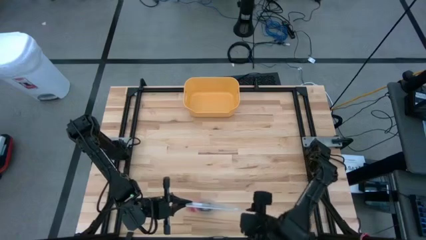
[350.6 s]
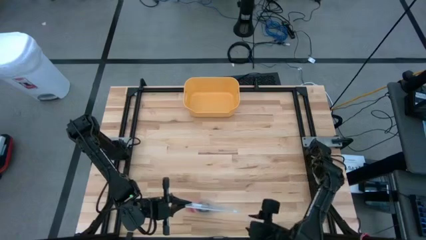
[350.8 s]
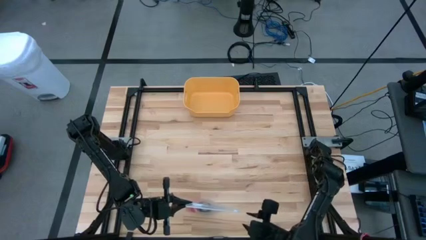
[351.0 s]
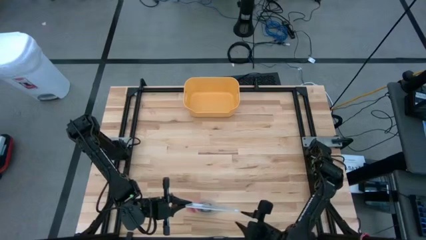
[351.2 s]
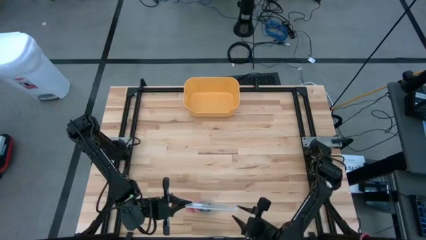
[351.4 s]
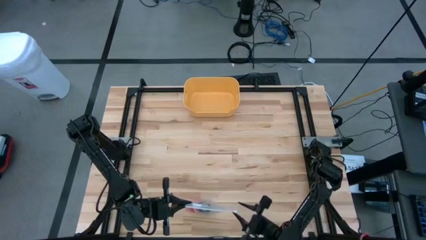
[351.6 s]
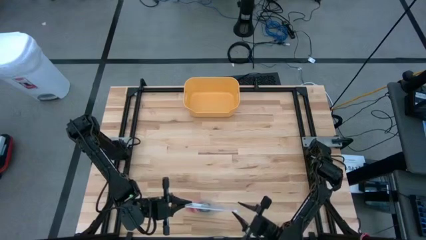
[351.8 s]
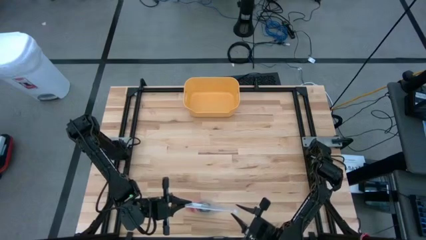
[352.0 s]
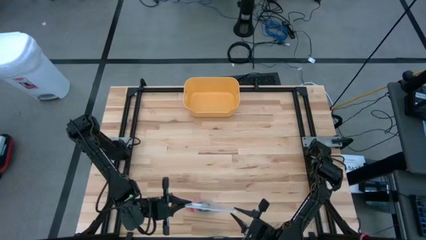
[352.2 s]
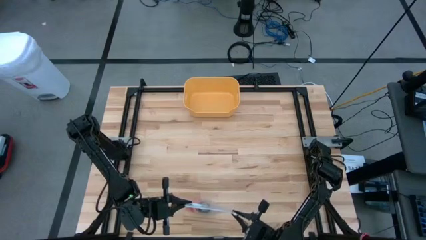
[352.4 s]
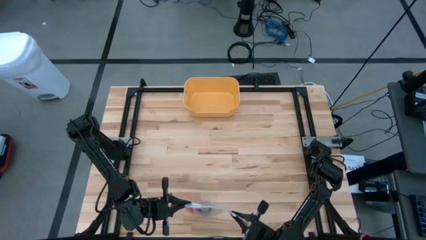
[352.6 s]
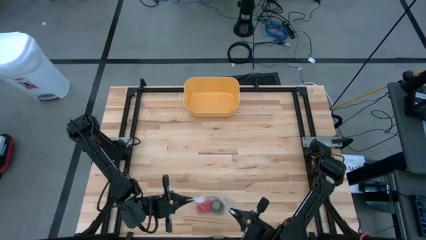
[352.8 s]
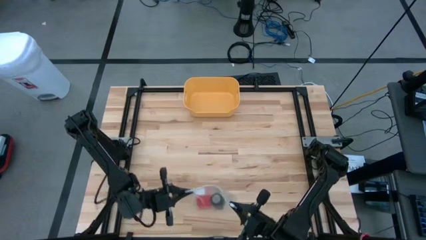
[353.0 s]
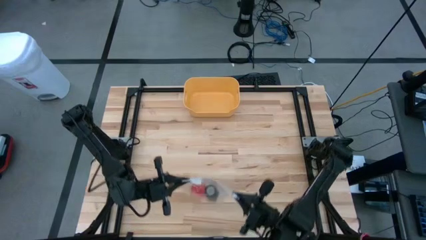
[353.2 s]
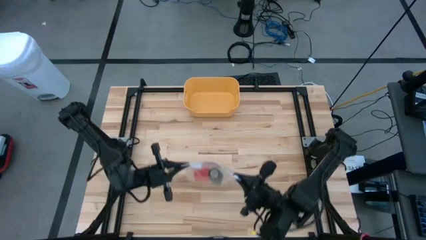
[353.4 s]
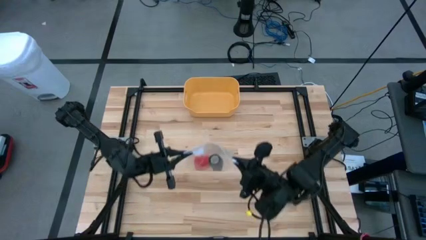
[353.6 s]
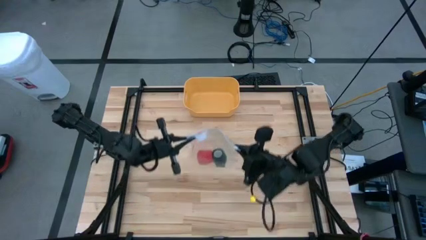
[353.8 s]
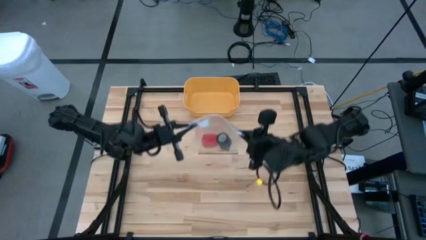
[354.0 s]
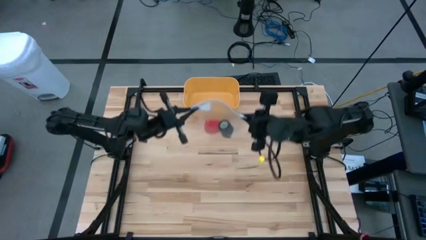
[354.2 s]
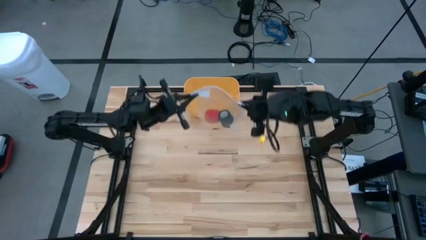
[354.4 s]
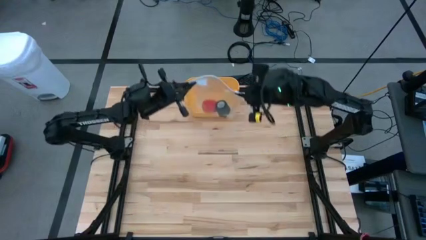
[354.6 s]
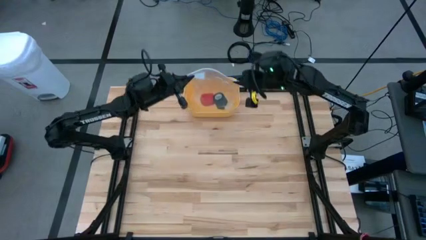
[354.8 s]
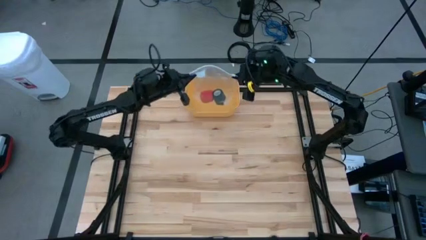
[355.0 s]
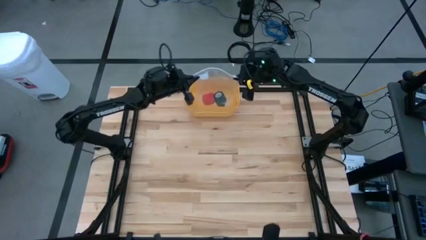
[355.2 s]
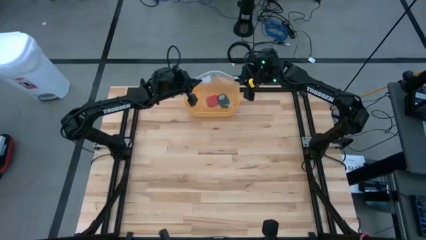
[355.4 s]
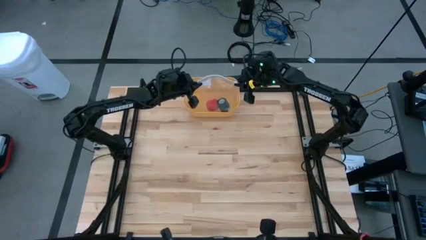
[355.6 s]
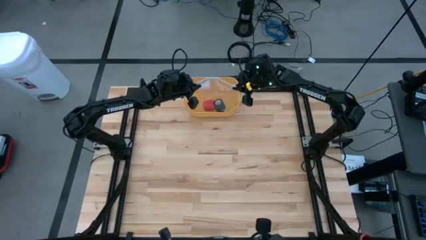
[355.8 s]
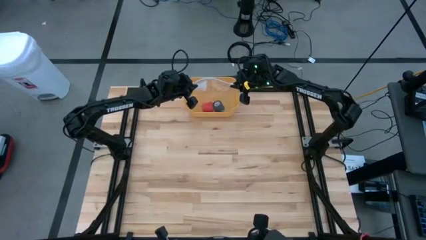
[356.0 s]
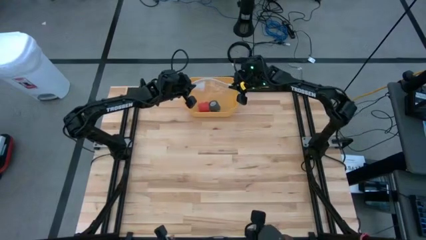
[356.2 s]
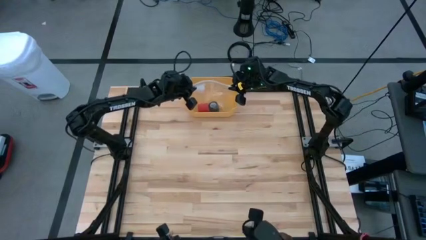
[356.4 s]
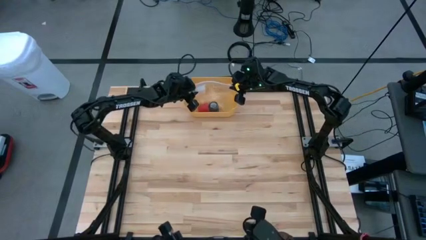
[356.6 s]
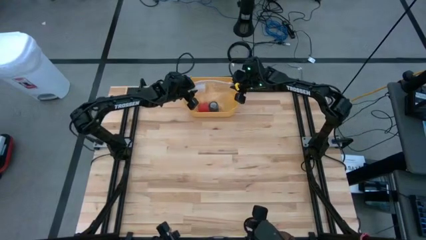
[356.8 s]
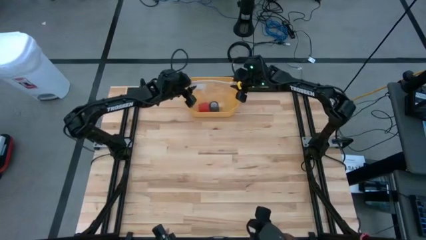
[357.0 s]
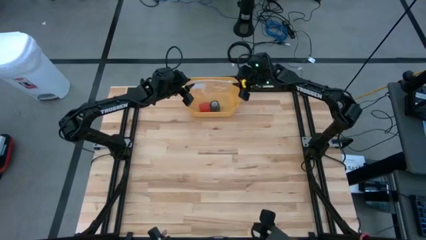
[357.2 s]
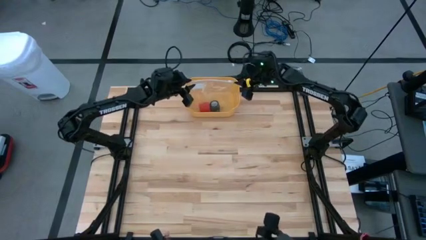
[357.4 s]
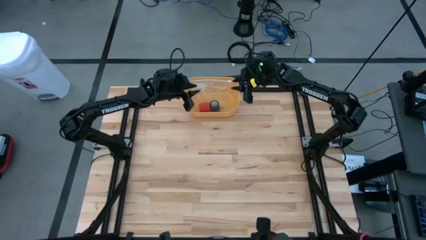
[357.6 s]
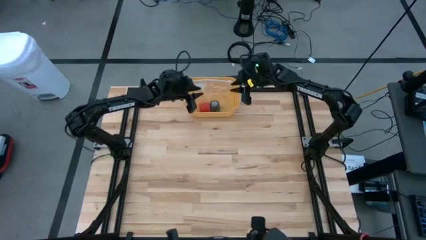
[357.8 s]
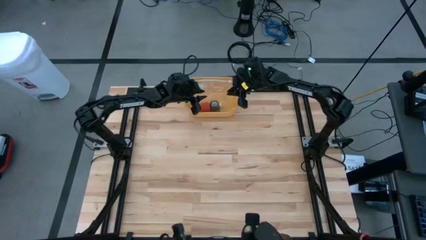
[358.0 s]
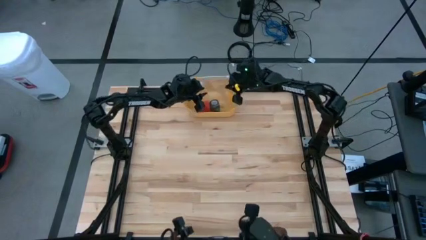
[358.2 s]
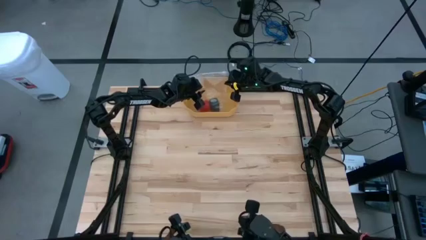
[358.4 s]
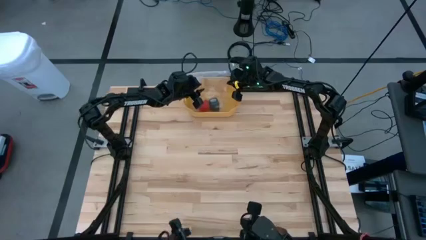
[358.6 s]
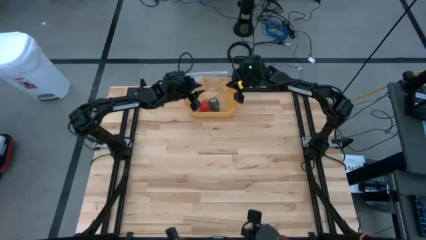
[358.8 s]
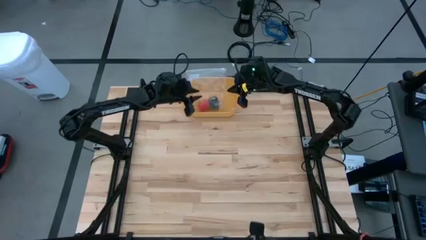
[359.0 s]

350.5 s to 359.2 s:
Task: Roll bandage
Put the transparent zip bag into the yellow bin

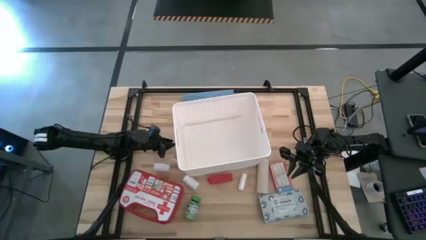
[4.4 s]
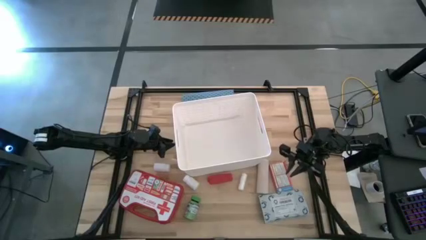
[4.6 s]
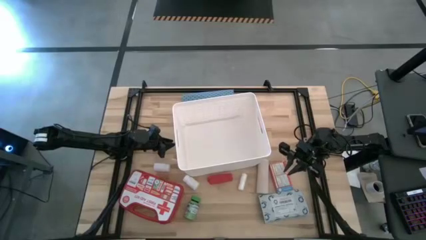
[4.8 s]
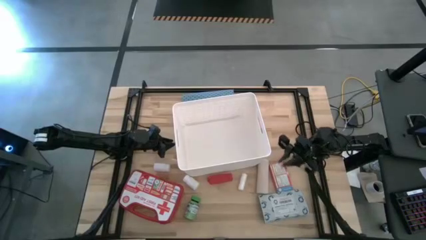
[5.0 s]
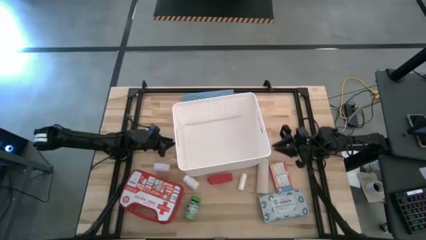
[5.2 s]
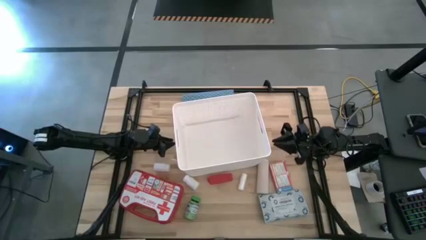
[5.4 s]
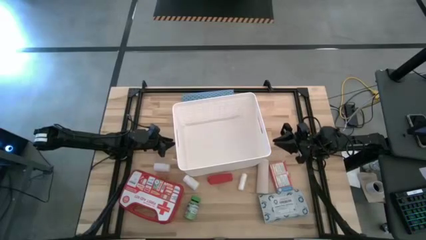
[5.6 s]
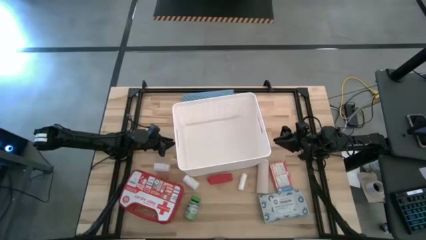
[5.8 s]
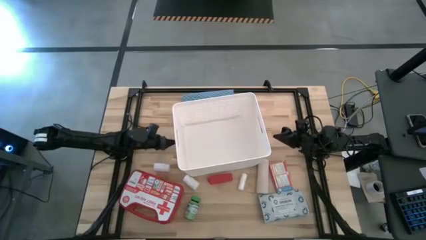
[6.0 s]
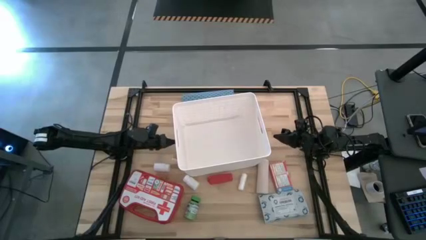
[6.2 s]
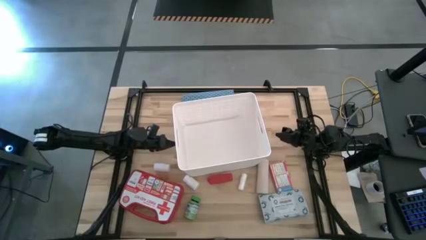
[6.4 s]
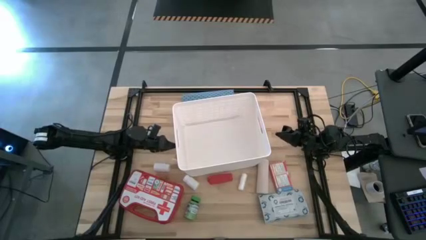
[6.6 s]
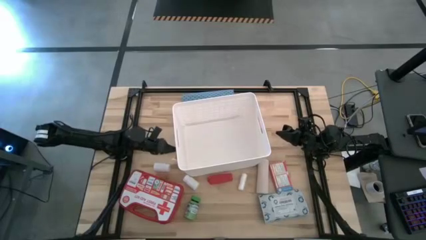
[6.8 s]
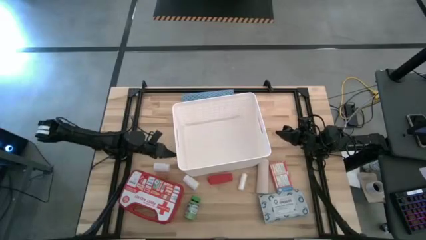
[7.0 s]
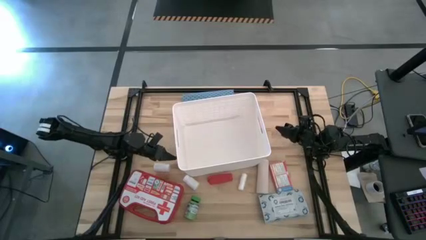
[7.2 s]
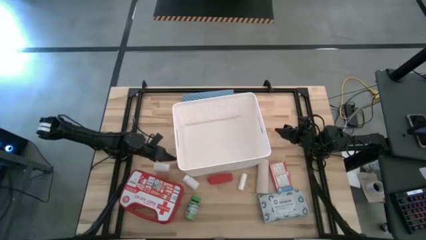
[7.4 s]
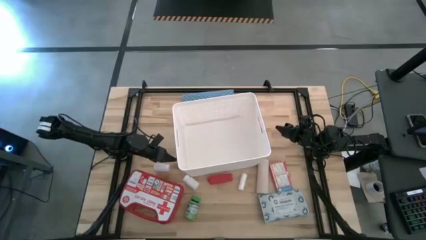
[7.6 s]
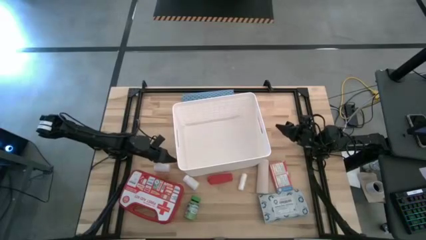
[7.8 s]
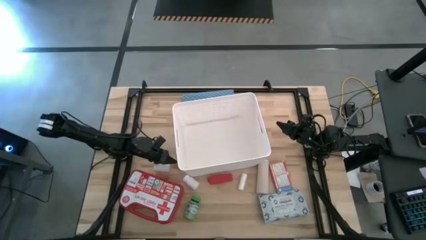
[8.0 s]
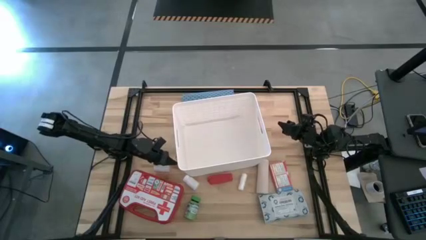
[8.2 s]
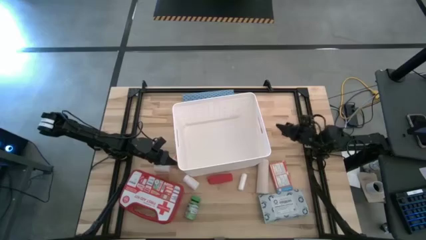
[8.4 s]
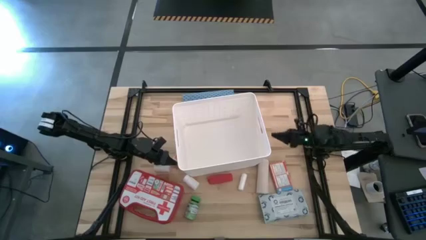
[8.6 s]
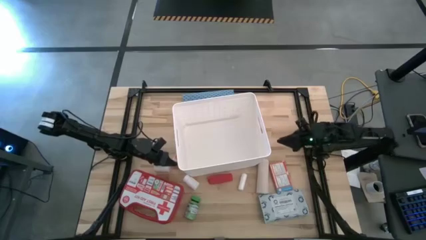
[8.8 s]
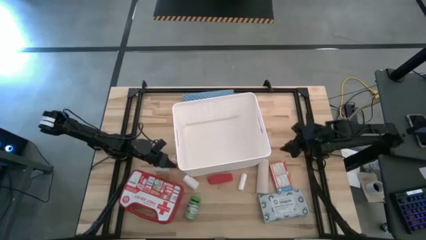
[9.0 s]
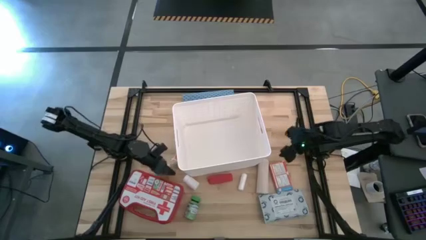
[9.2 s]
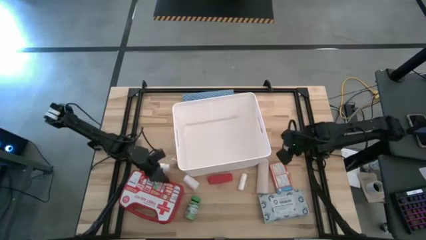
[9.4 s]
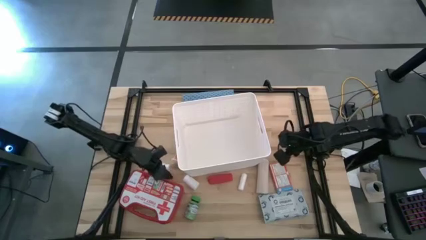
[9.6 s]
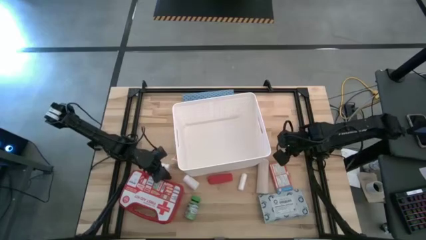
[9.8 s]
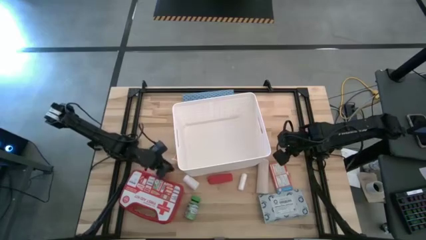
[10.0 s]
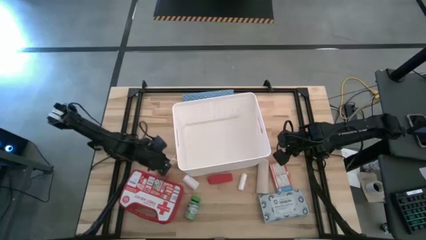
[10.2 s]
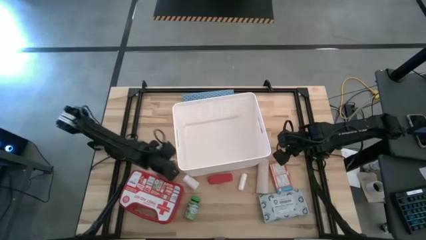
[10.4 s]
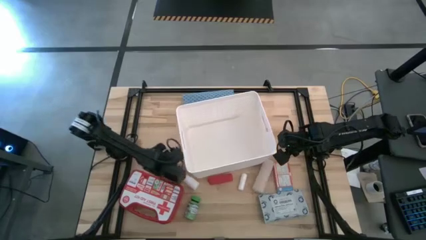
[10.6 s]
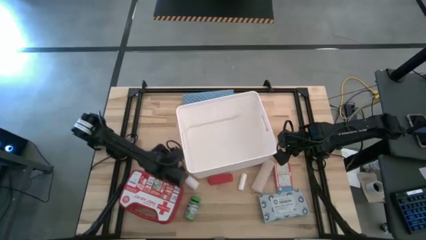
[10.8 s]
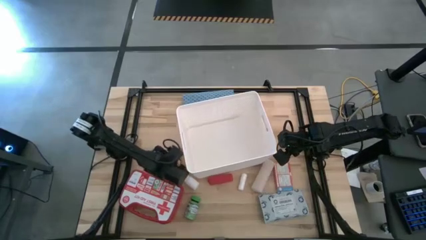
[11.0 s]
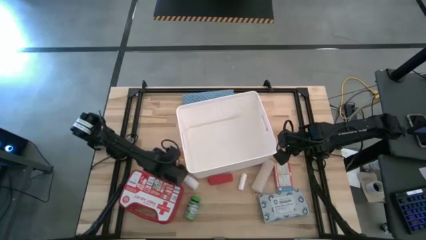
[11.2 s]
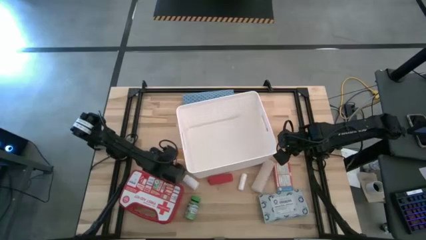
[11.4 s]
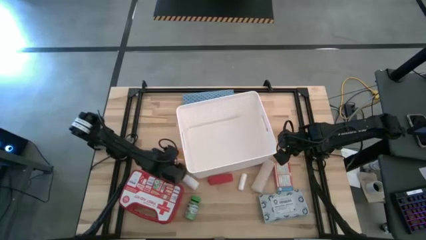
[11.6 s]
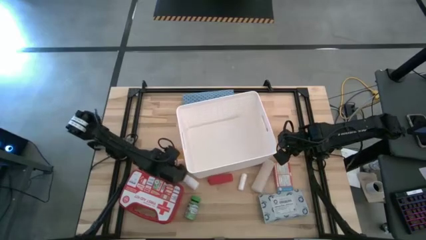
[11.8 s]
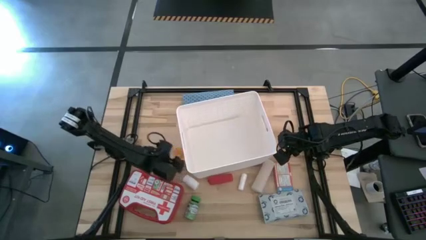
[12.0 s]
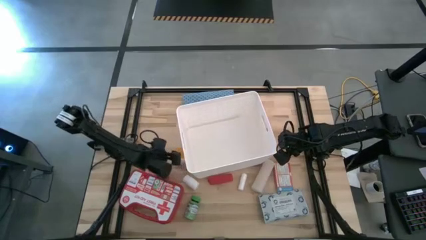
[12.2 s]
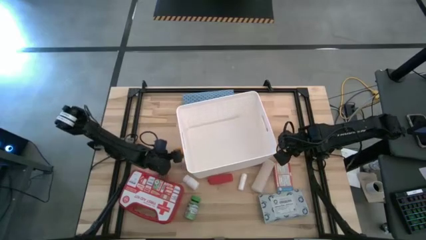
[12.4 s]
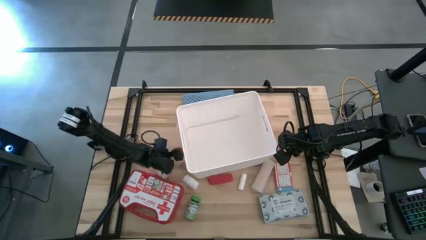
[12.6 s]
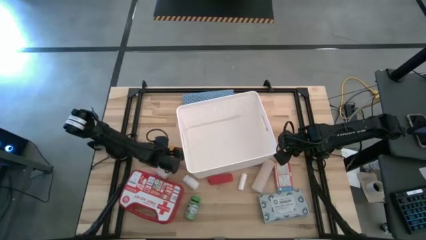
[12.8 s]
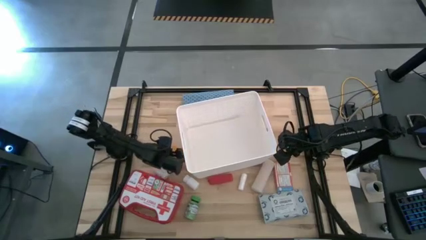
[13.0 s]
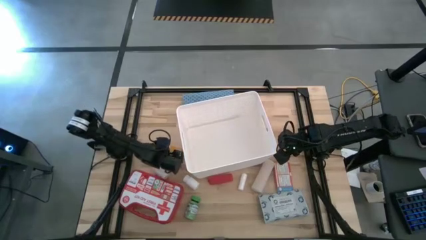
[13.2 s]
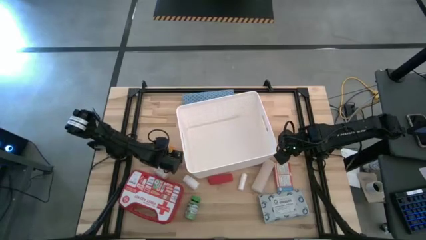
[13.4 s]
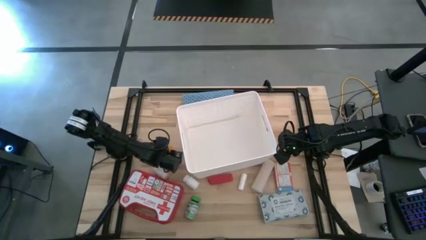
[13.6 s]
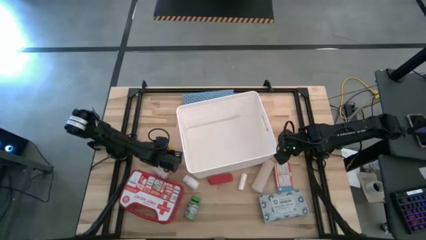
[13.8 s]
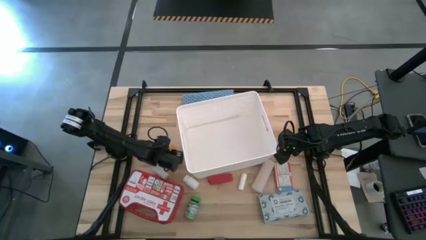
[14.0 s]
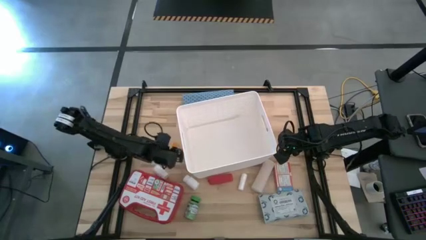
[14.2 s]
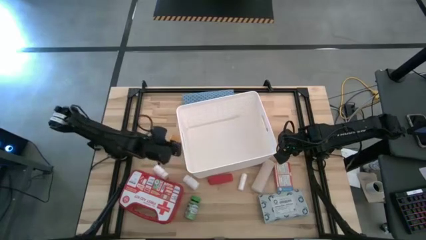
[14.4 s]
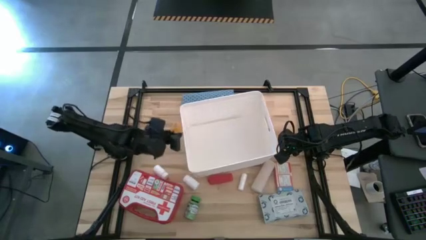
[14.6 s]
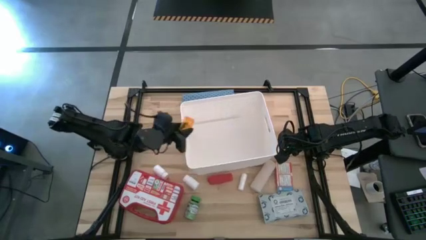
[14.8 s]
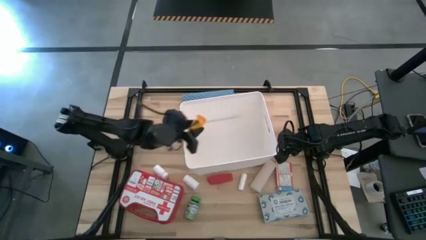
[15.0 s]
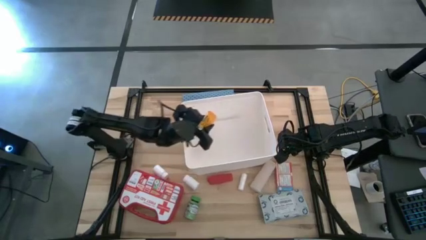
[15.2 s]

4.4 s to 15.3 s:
Task: Pick & place medical supplies in basket/bin
Put the orange pill bottle into the white basket
